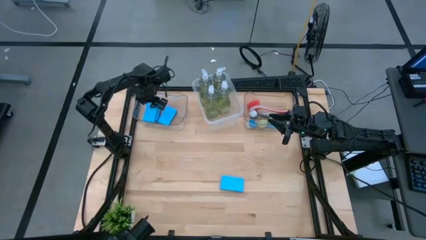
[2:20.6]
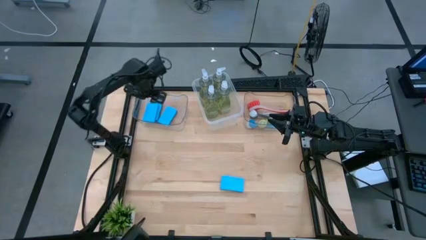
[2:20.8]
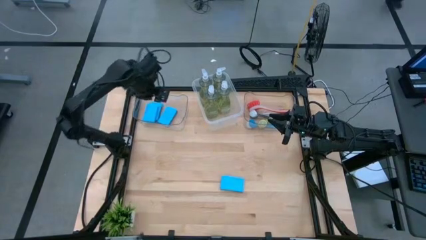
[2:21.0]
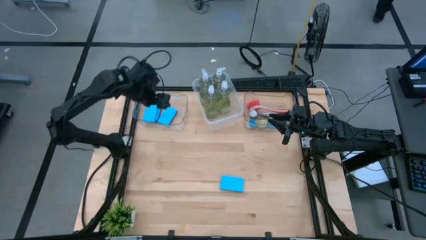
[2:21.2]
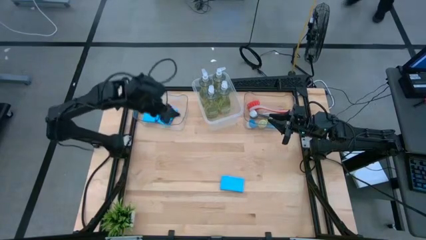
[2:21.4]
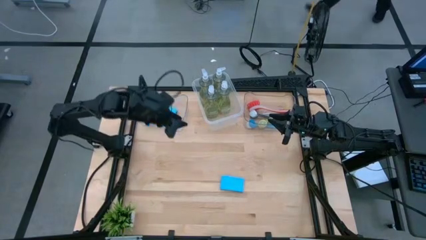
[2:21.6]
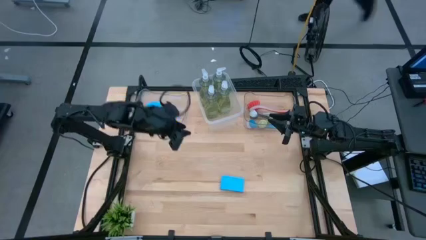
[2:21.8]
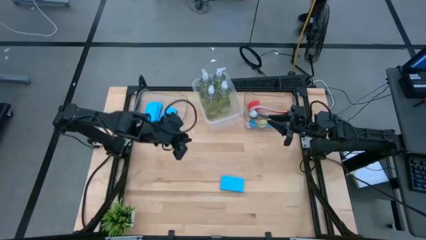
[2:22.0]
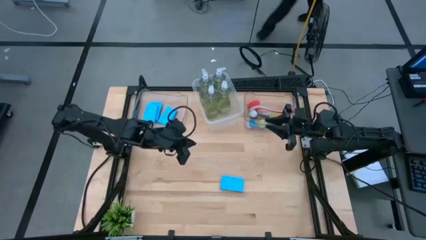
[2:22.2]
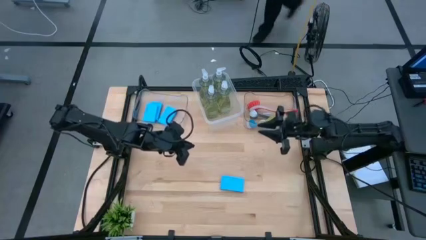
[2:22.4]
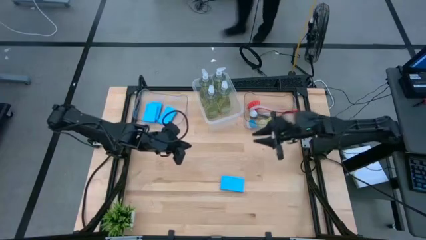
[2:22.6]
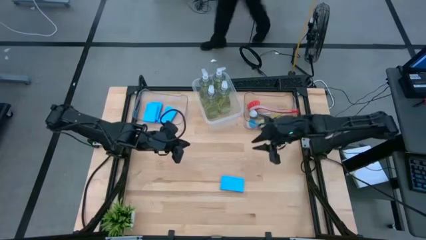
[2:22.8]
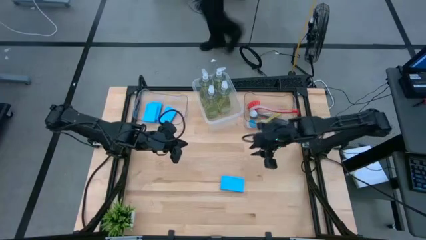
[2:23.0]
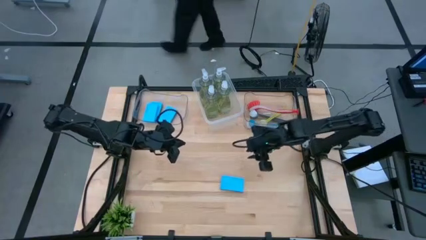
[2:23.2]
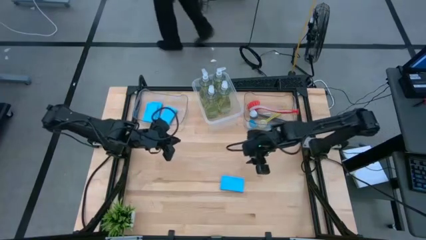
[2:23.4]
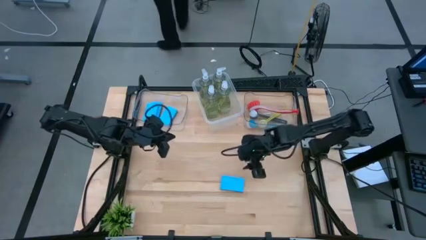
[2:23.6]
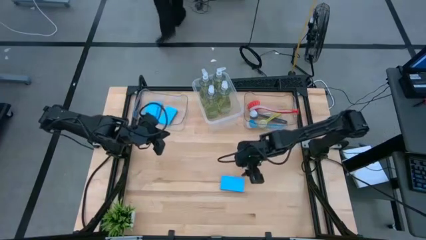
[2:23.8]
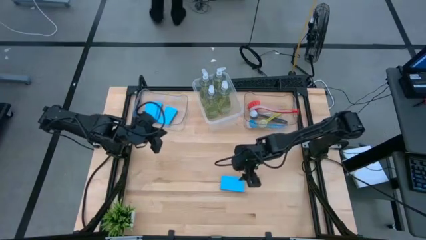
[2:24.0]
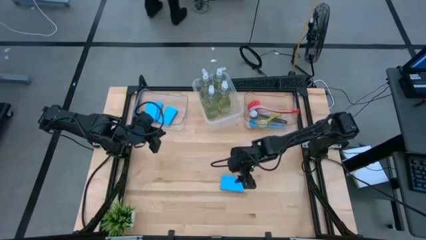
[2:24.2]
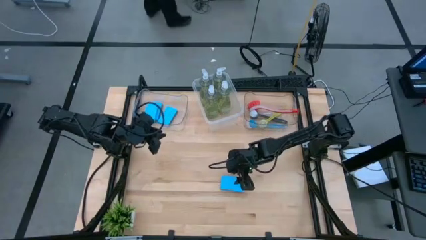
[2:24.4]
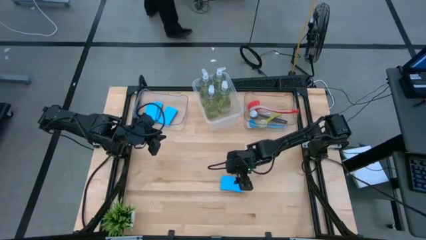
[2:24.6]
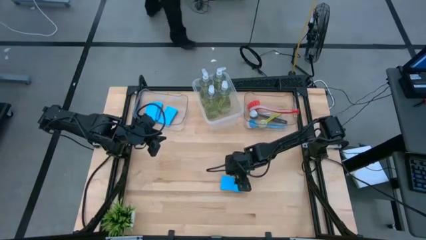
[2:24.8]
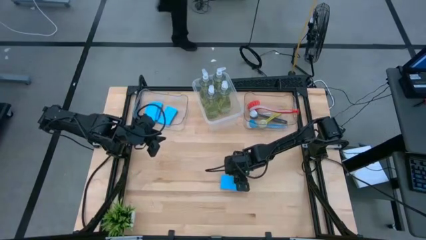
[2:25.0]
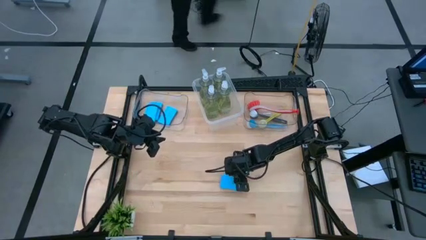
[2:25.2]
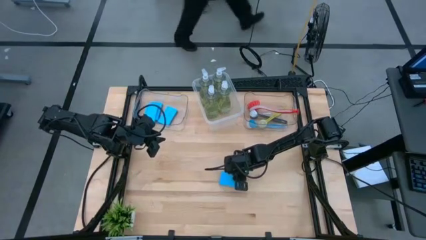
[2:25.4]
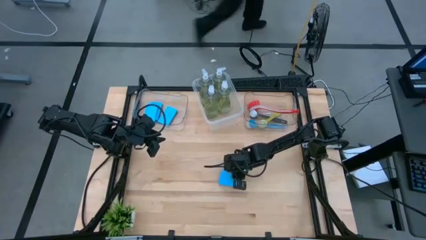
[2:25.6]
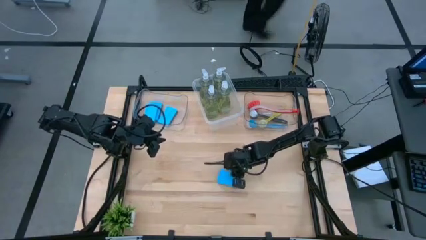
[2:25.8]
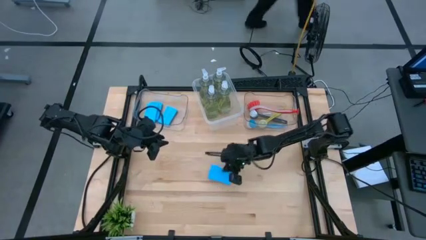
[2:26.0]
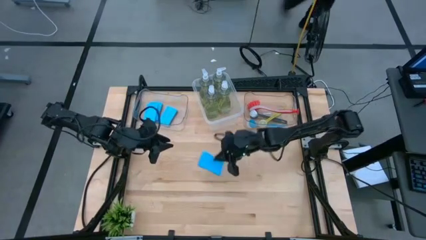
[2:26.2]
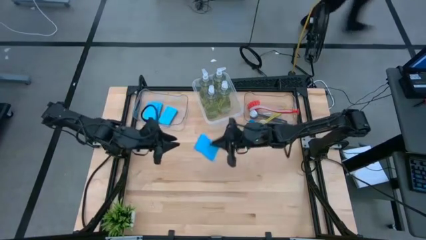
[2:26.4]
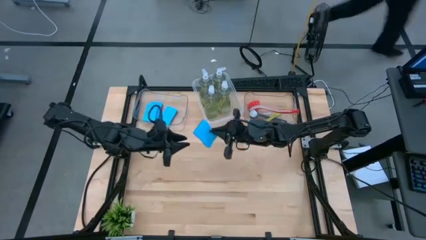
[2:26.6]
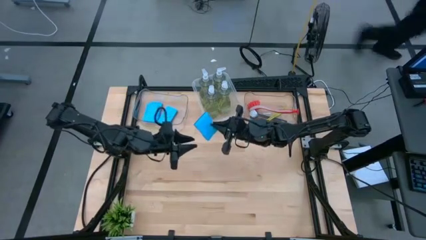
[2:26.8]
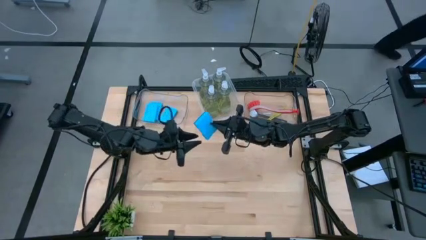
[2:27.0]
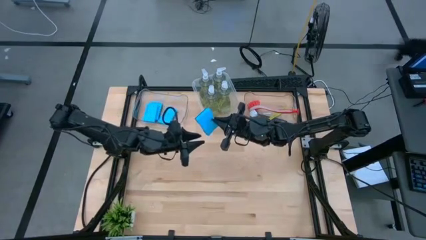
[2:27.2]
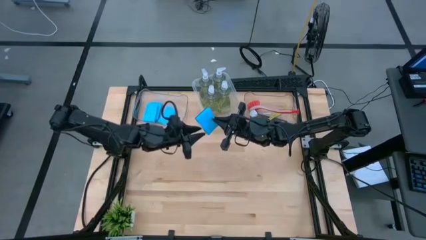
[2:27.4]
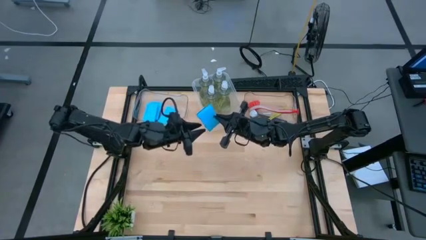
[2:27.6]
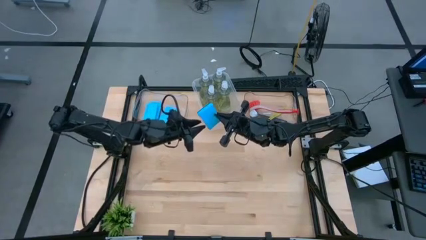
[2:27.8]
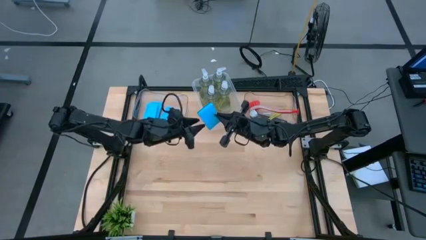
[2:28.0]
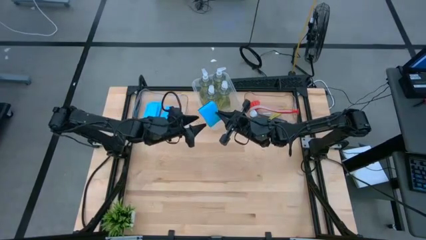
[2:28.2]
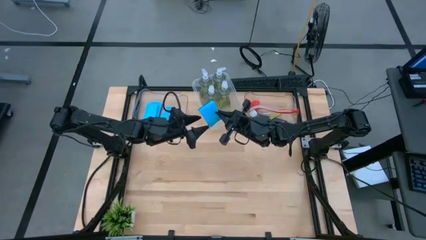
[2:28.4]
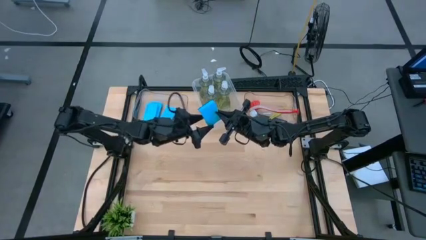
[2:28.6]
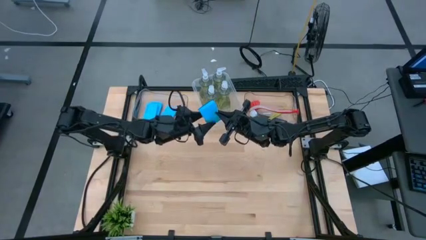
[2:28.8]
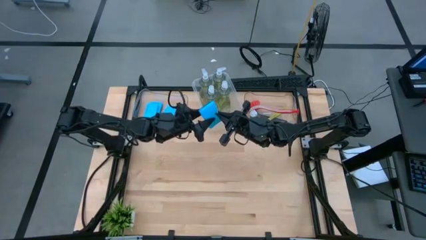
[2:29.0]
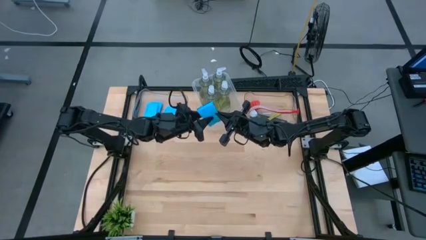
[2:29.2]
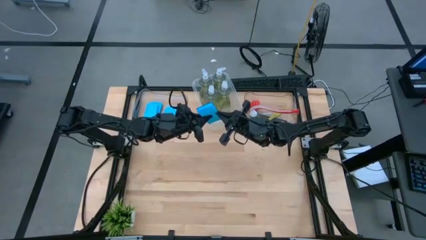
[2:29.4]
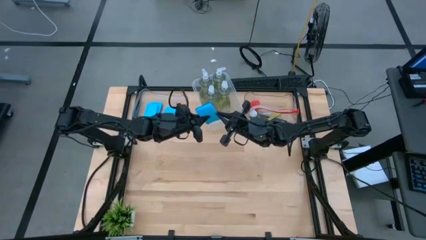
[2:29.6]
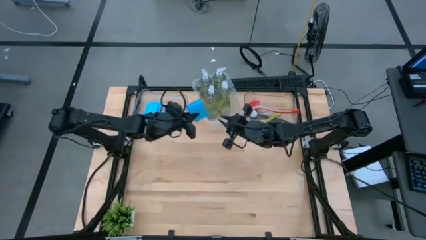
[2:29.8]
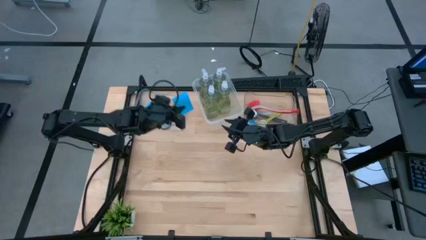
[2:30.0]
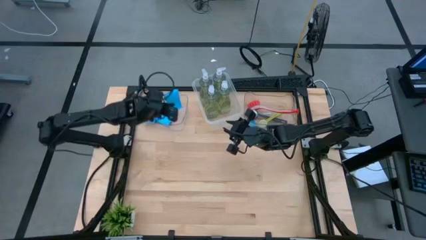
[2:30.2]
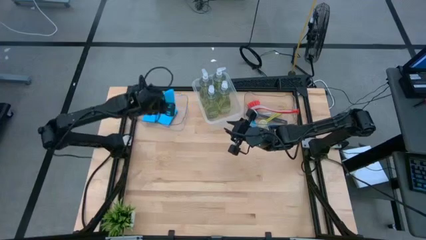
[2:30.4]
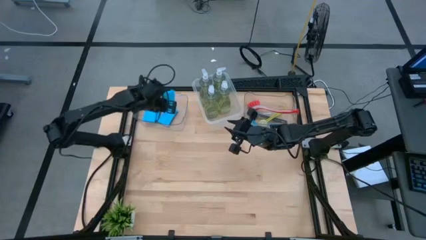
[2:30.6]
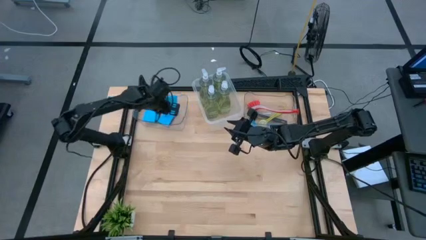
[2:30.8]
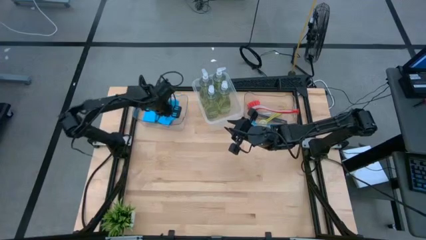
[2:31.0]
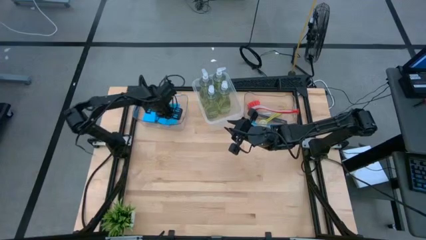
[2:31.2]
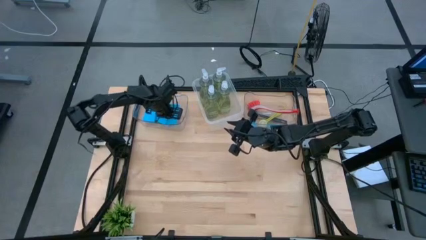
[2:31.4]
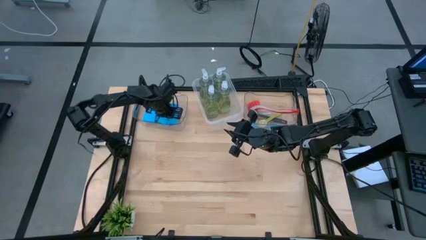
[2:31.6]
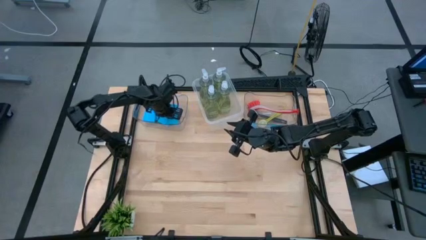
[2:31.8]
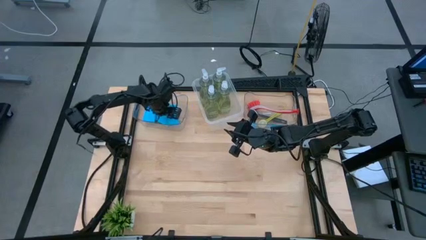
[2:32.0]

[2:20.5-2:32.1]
Task: Pick & Place Kitchen Sink Supplies
Put the blue sponge into the left transparent bin
